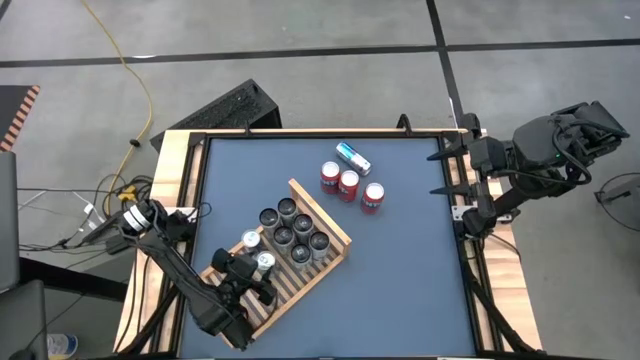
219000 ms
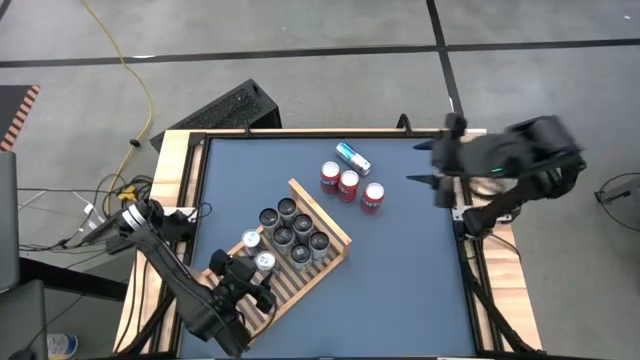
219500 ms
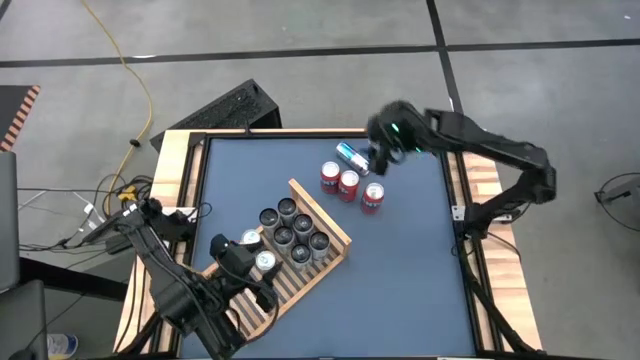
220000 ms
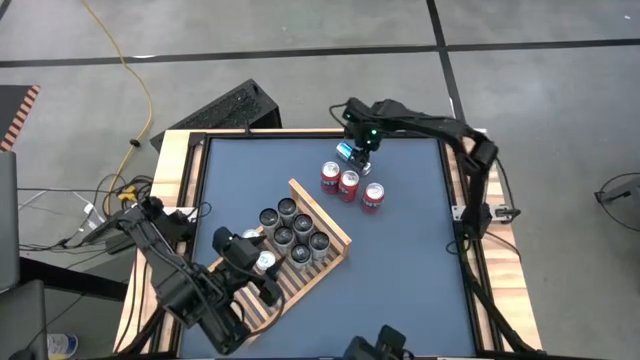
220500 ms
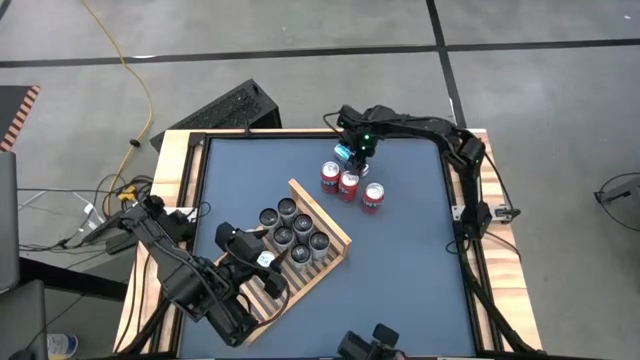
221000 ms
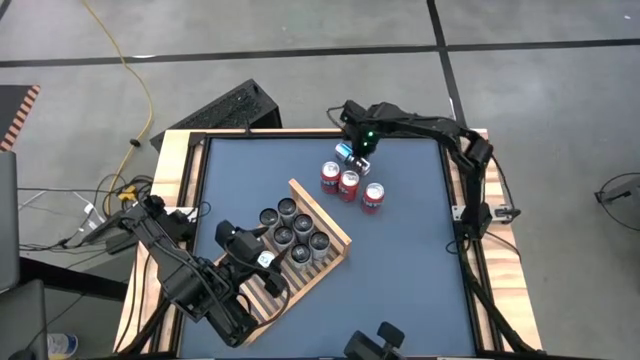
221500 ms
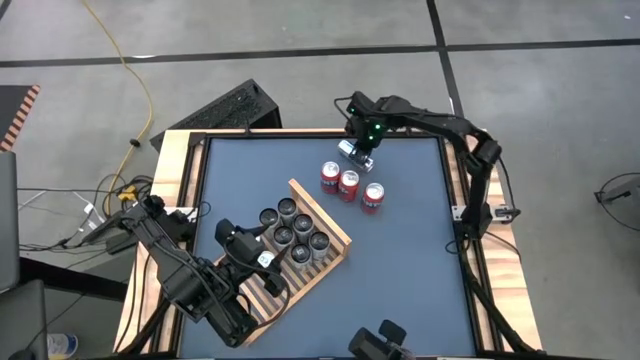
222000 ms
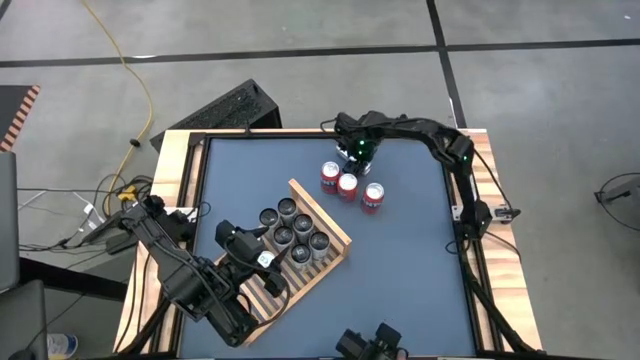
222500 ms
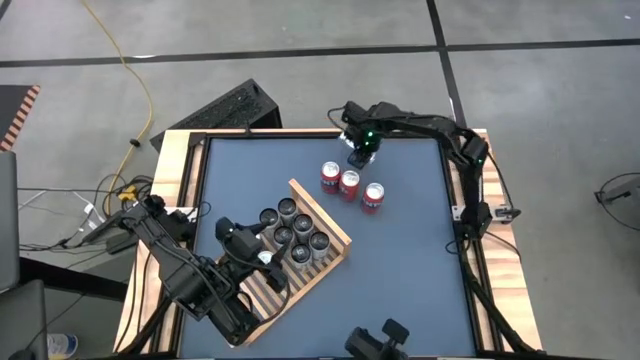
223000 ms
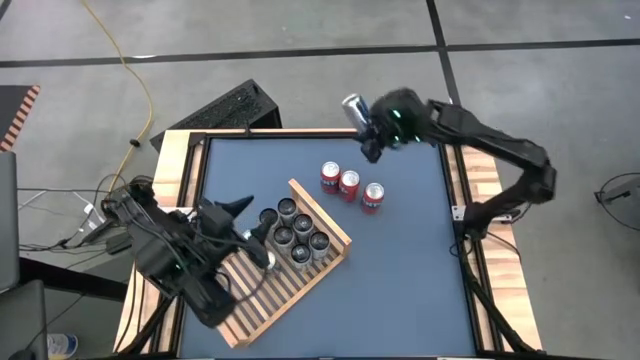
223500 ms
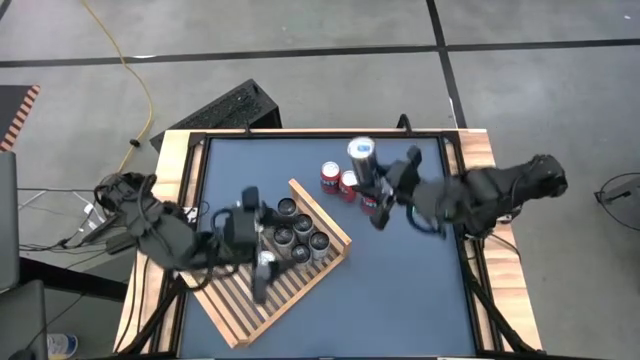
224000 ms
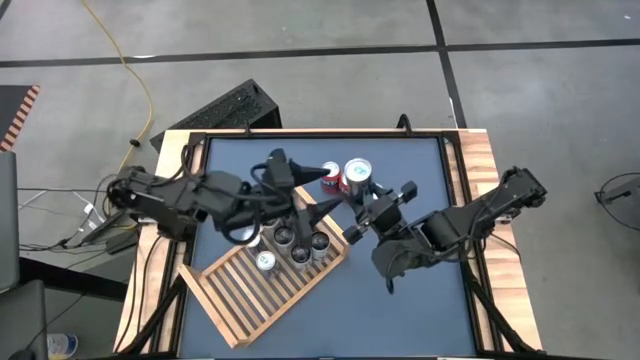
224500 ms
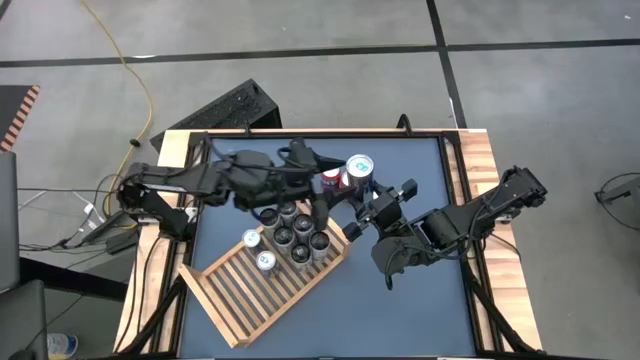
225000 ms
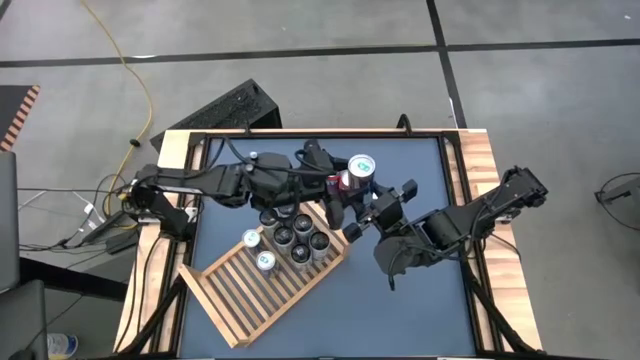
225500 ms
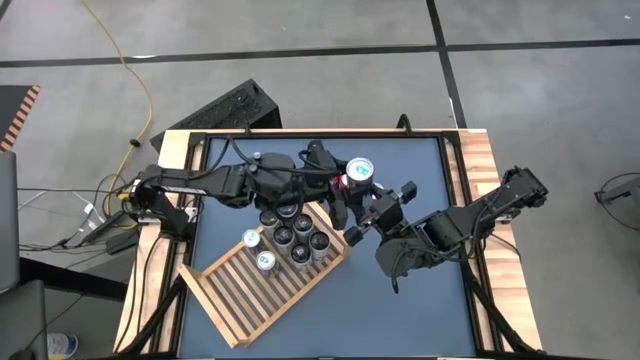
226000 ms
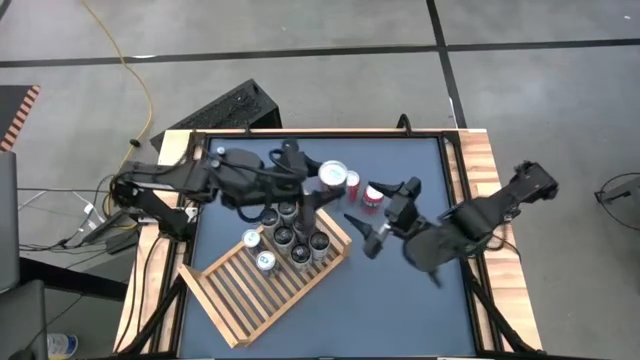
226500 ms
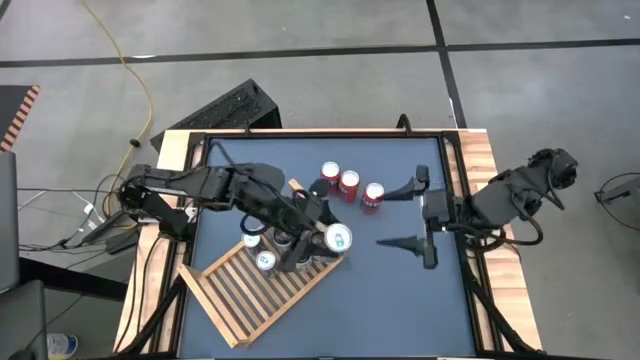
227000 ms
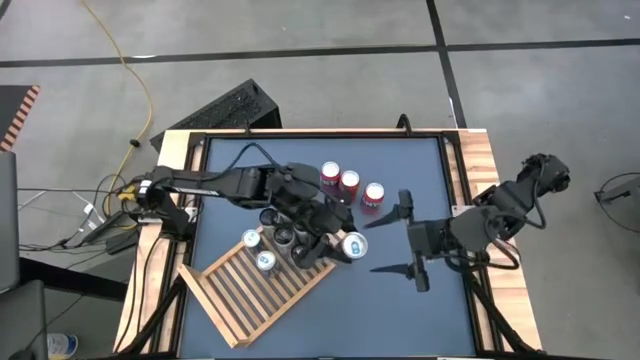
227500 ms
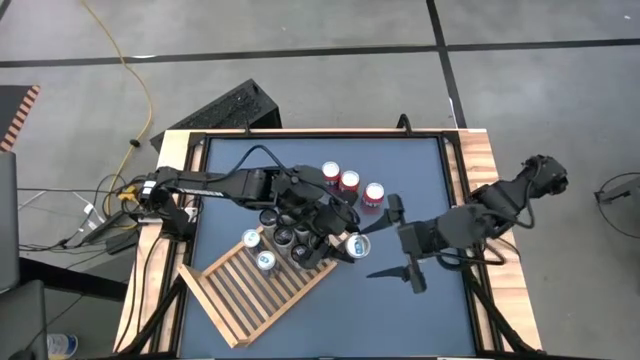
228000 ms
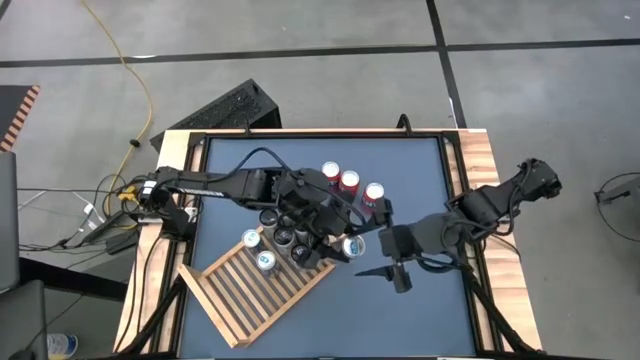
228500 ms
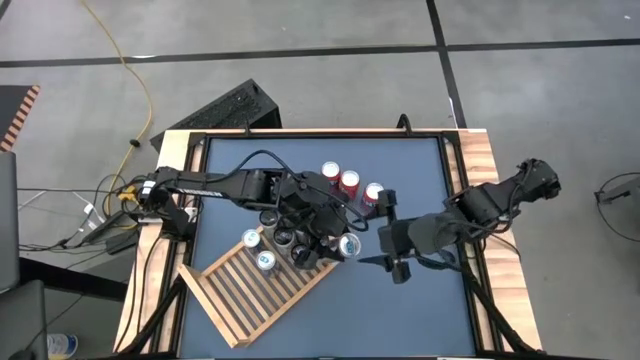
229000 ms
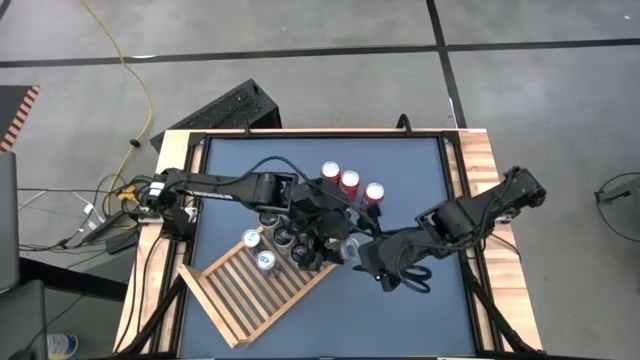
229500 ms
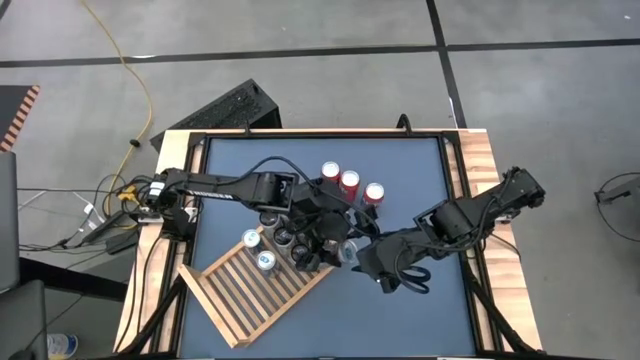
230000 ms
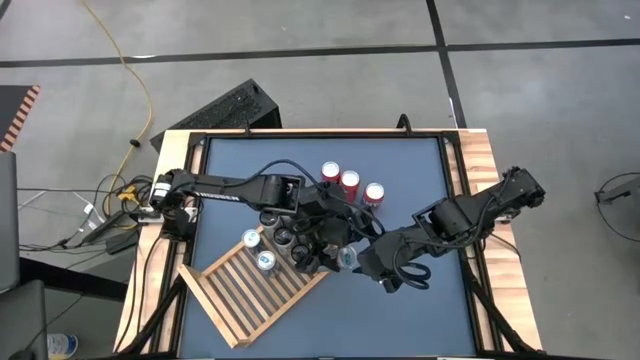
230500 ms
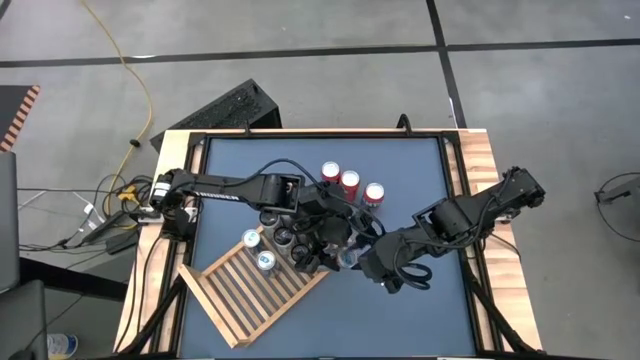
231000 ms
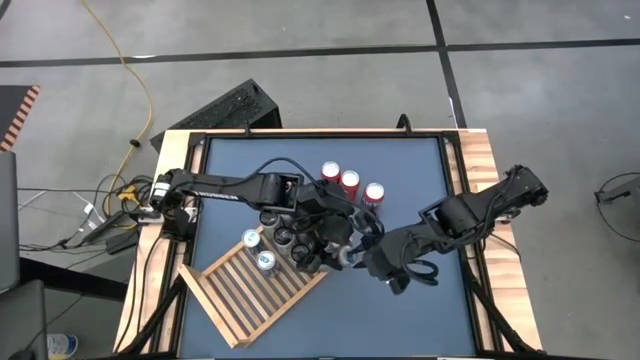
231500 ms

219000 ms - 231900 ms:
Task: Place canned beverage on shelf
Put the blue soda can on the shelf aligned with the other blue soda cans

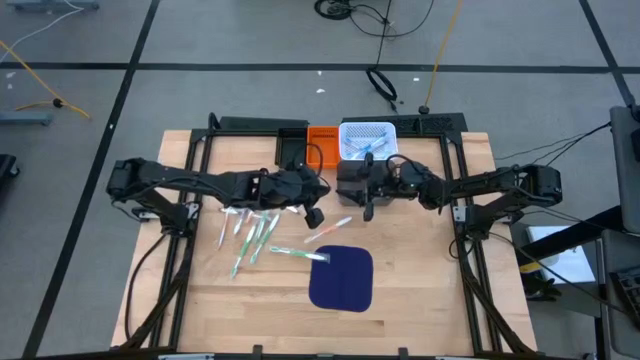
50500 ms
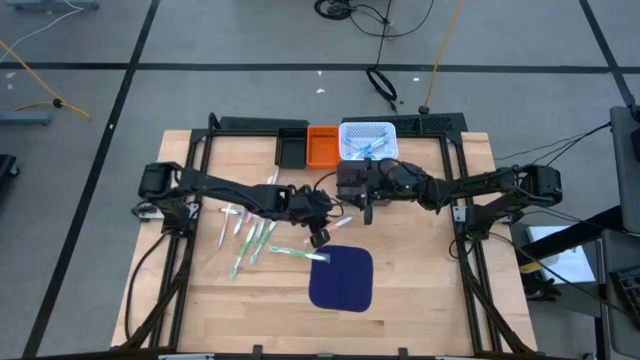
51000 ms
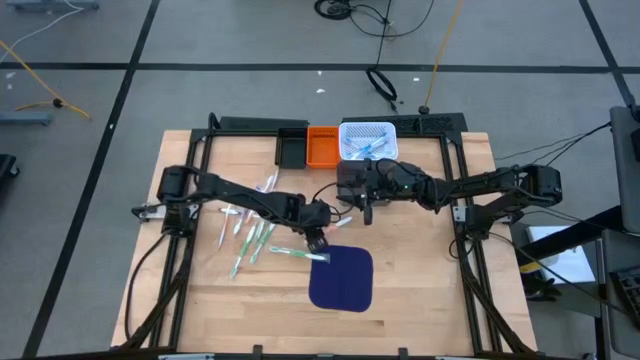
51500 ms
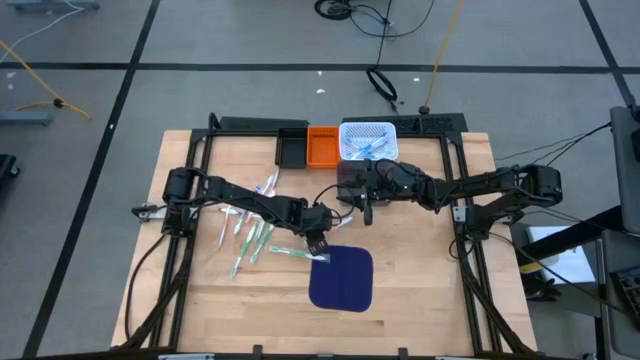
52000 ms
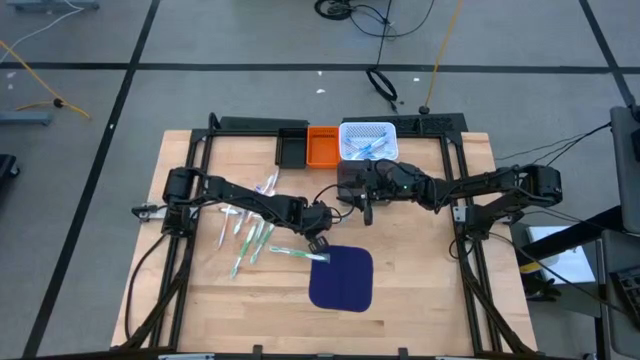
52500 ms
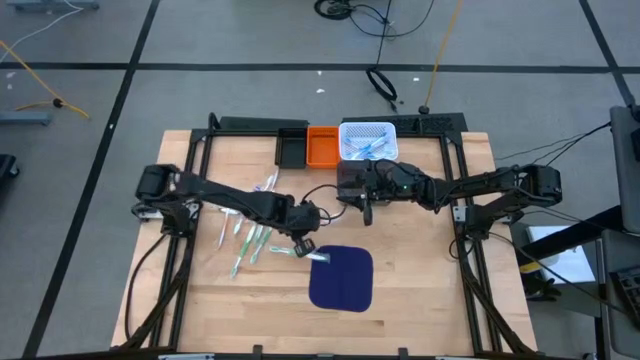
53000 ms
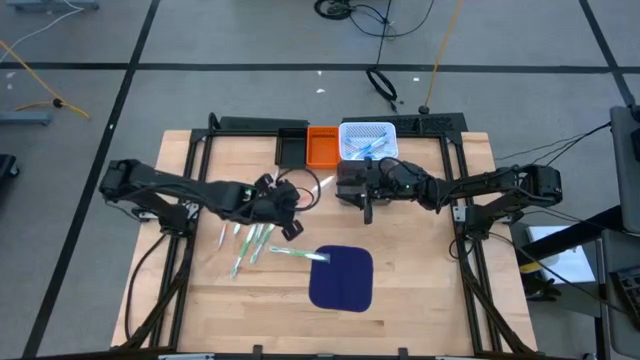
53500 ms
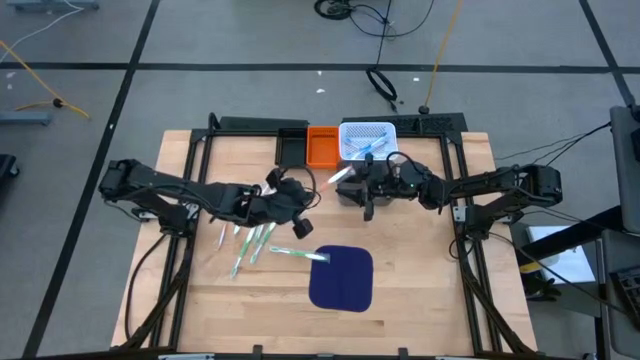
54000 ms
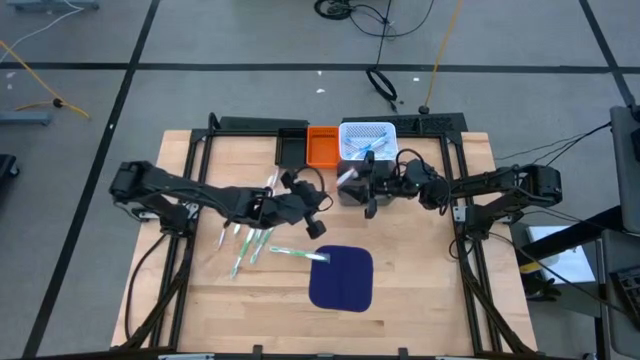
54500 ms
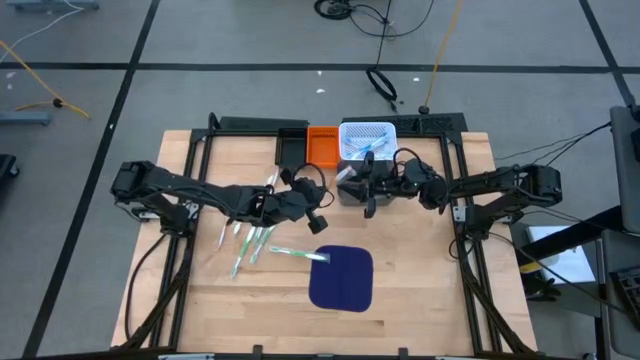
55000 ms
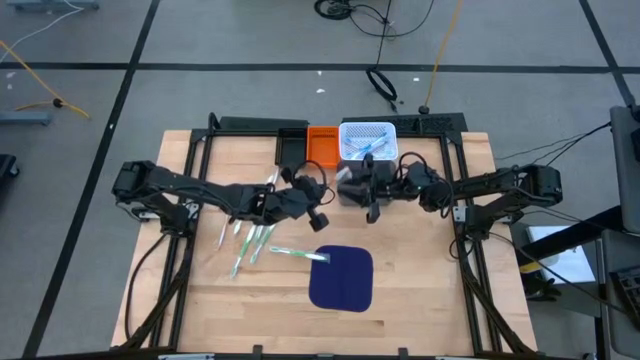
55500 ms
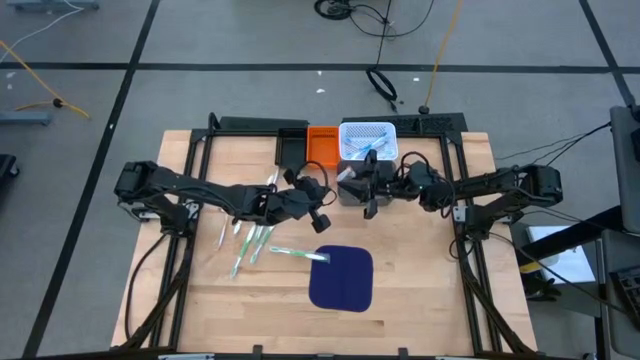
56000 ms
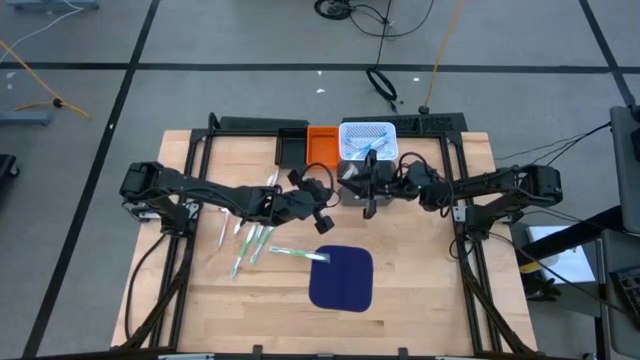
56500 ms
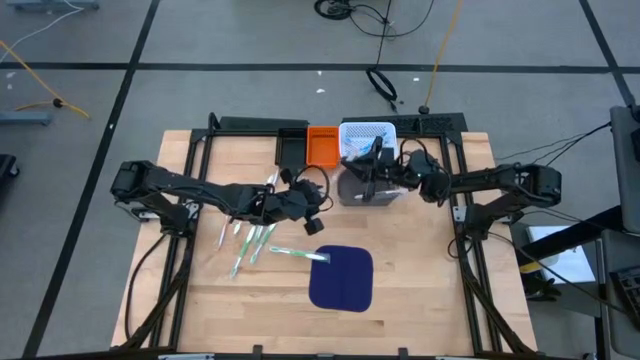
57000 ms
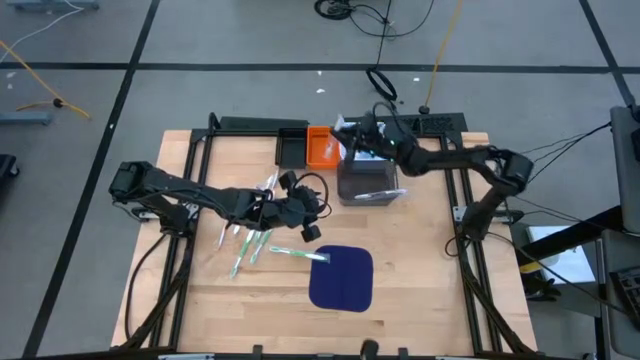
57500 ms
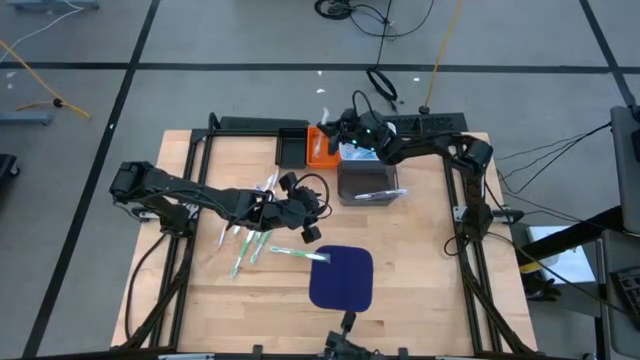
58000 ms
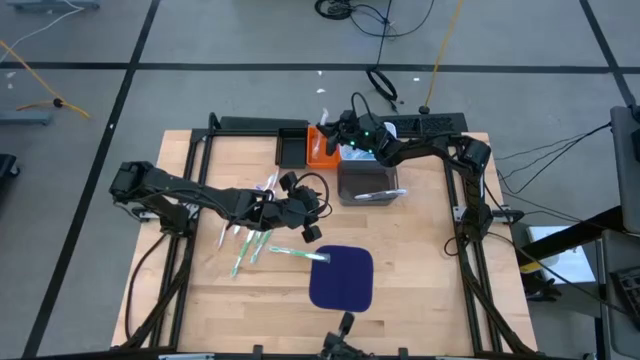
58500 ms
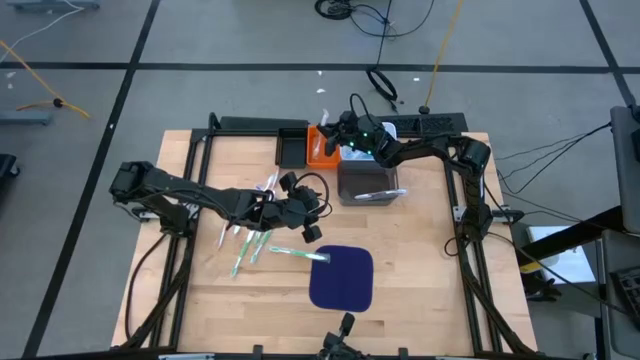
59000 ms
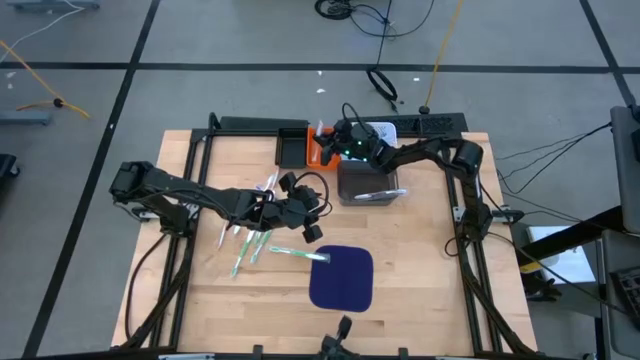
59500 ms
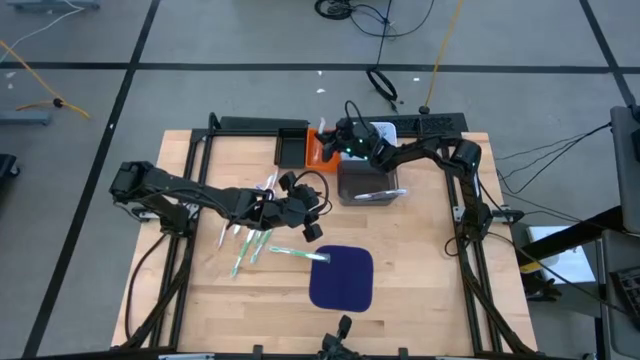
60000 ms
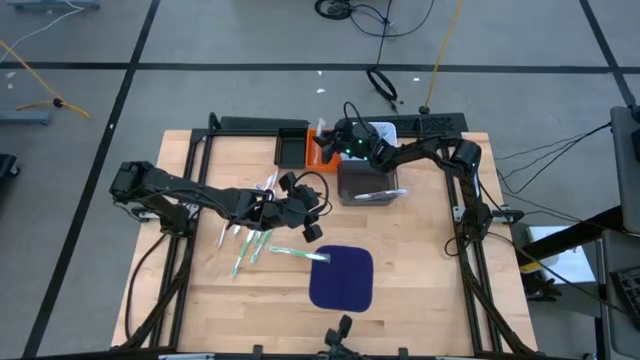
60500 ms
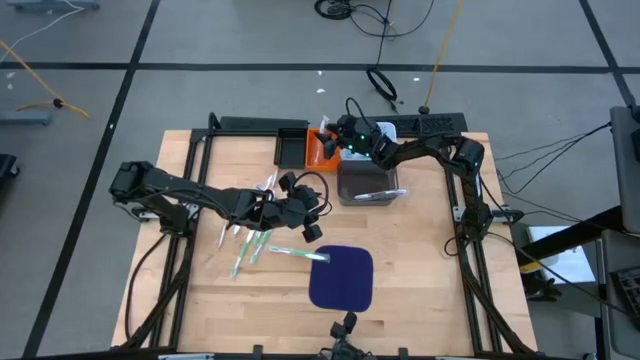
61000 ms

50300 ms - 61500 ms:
Task: Pick & Place Toothbrushes
Put the orange toothbrush into the orange basket
